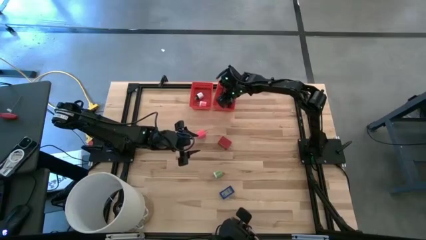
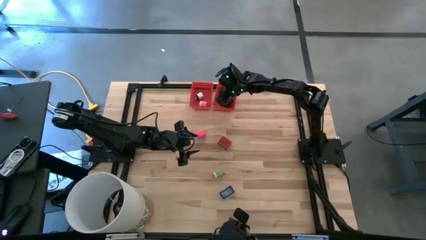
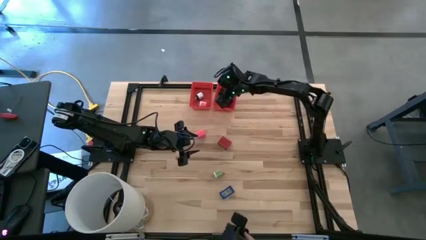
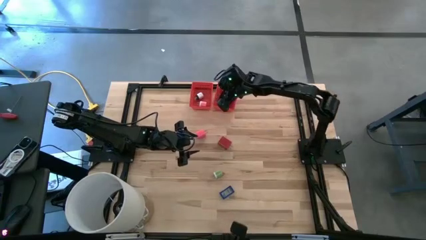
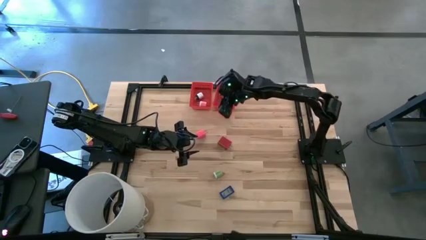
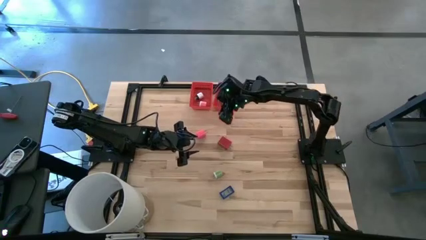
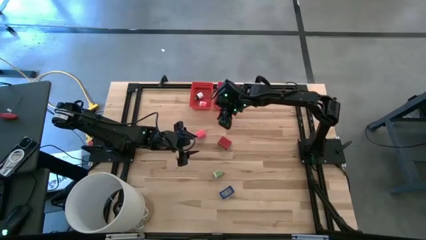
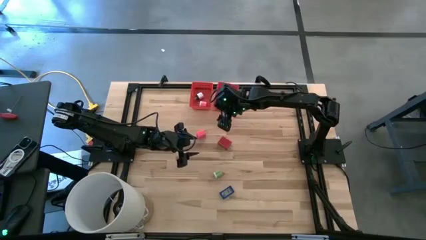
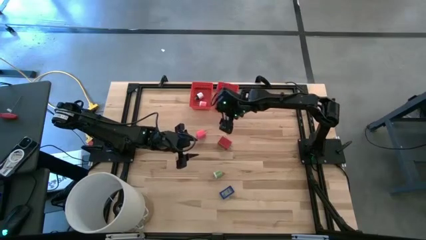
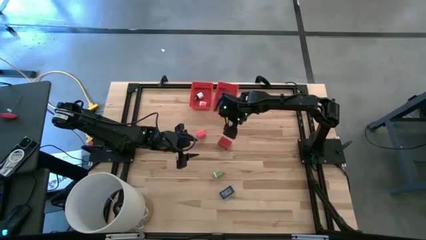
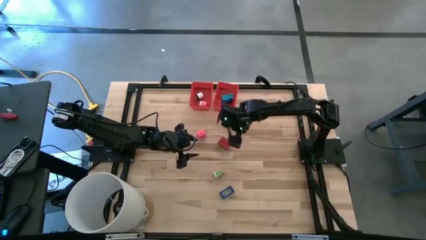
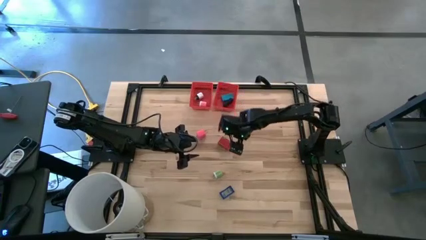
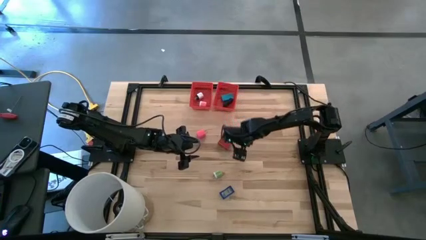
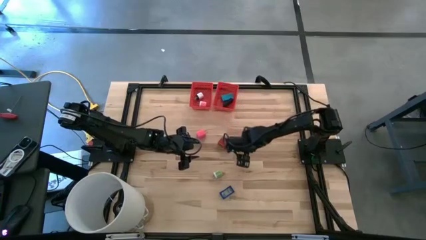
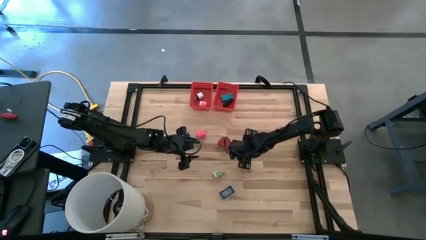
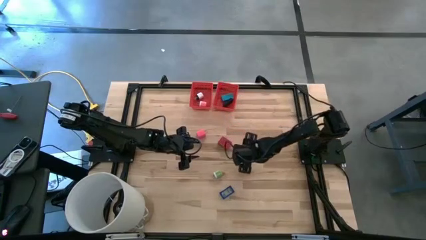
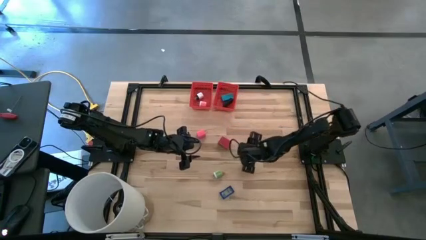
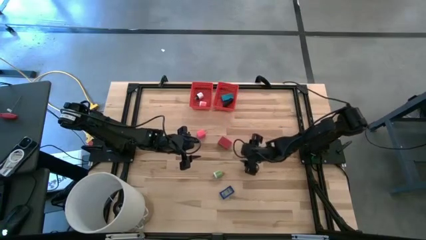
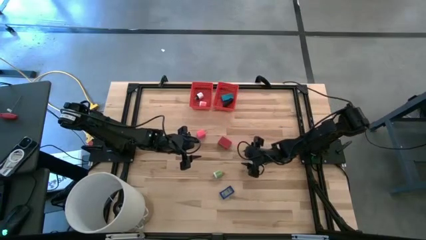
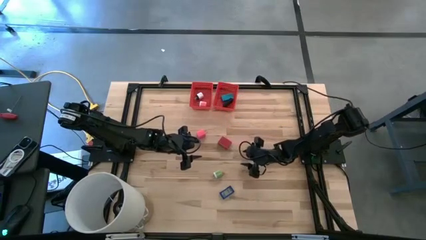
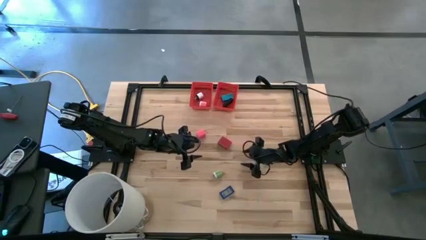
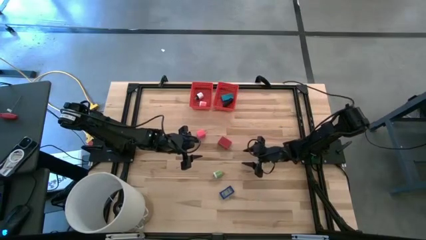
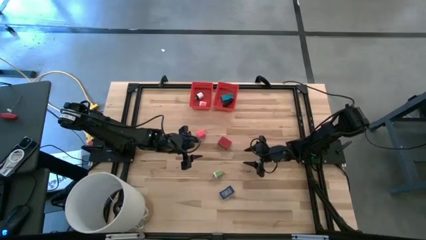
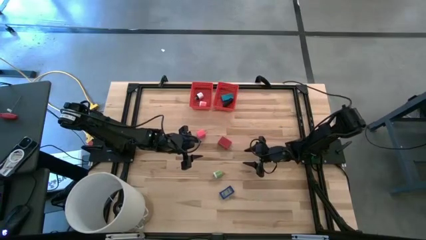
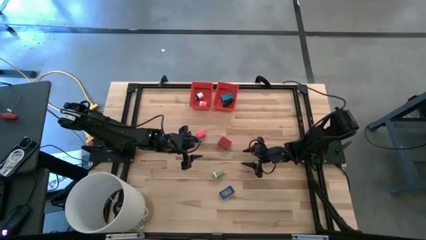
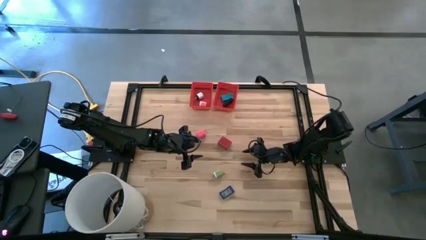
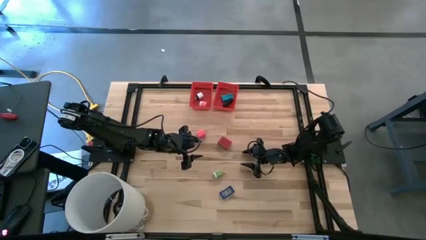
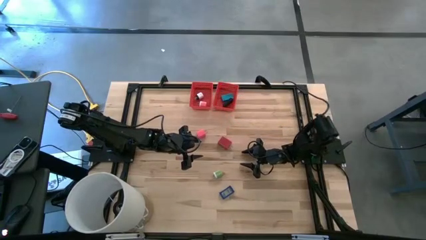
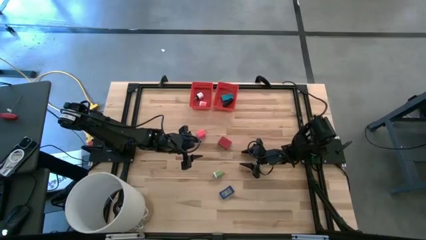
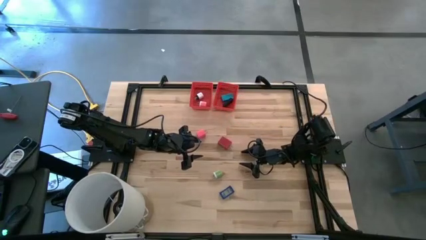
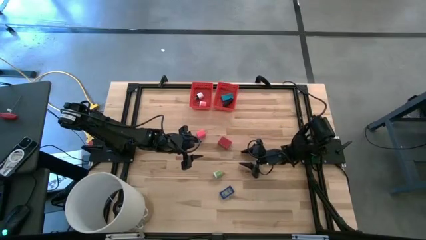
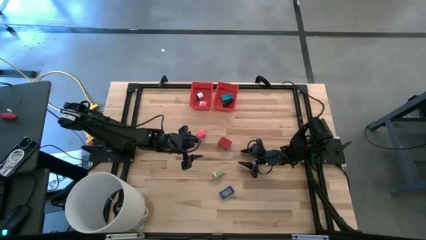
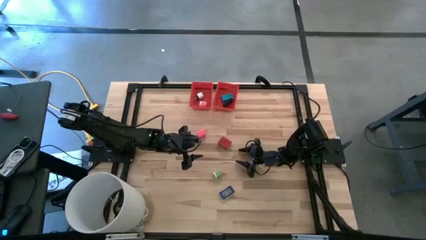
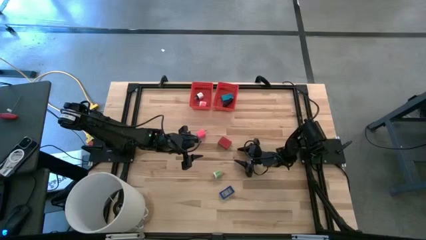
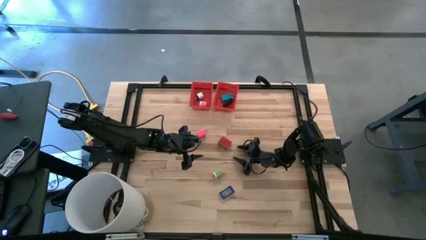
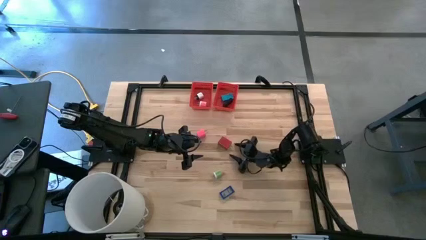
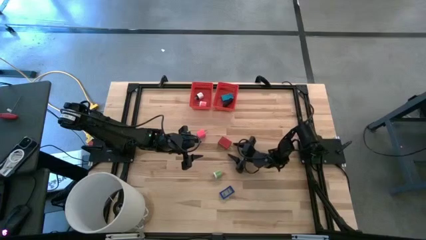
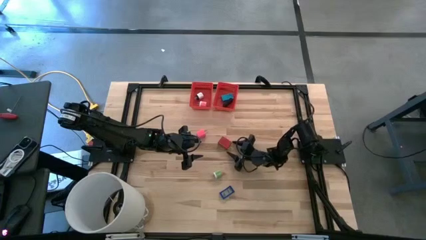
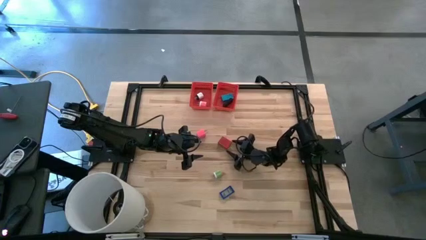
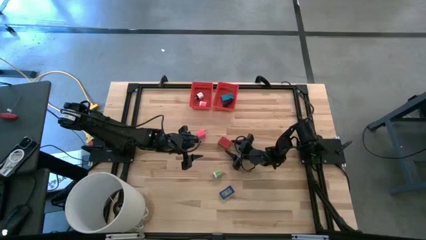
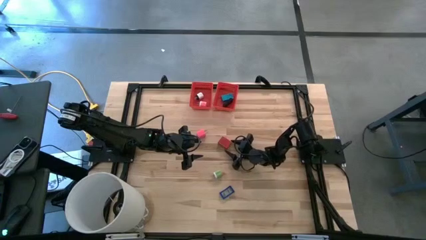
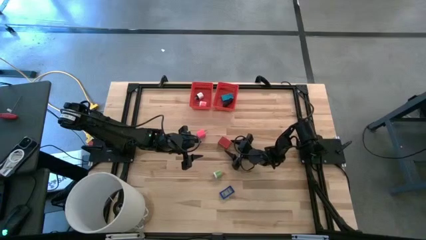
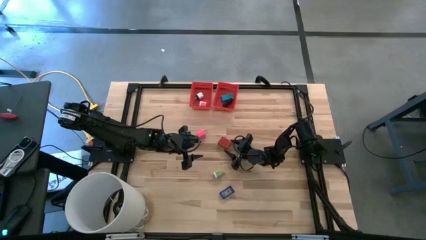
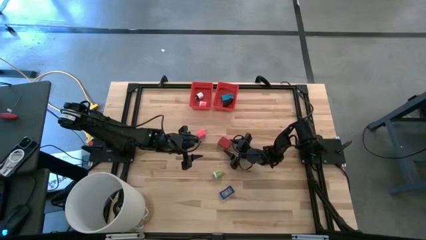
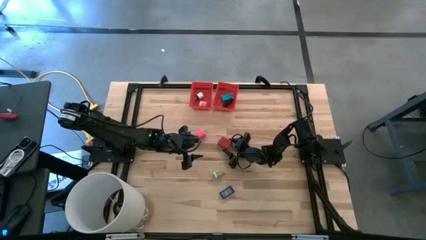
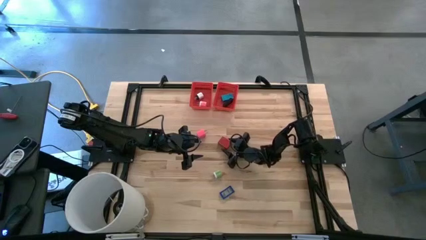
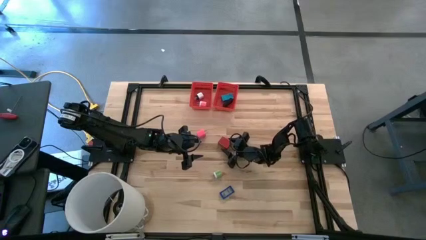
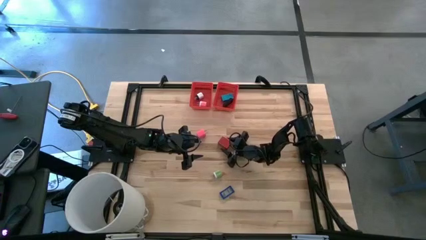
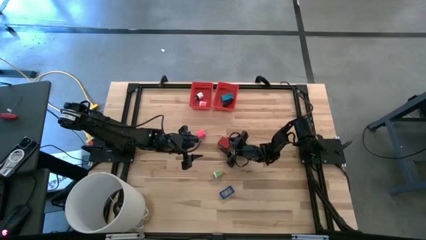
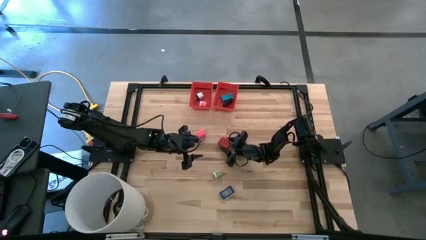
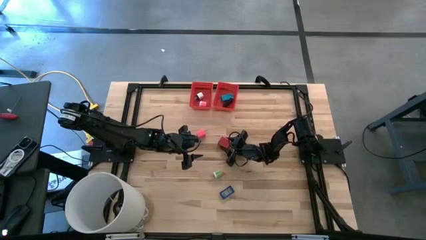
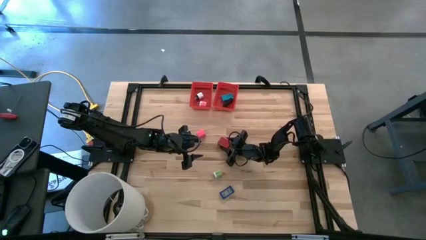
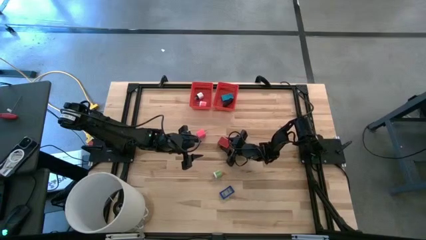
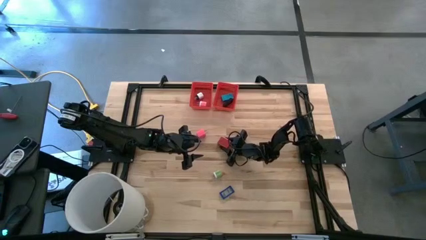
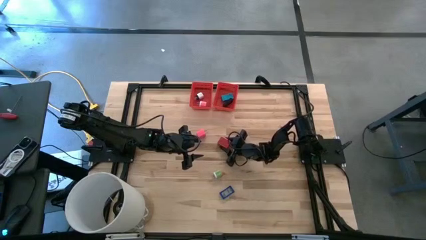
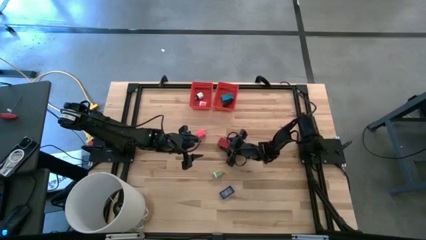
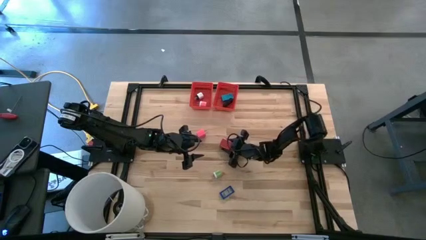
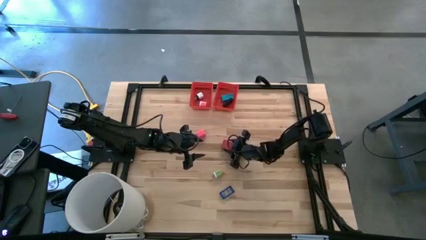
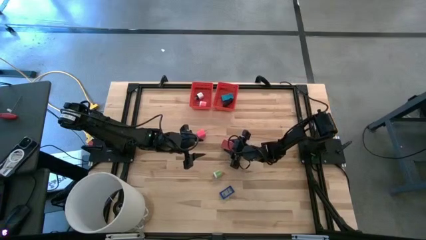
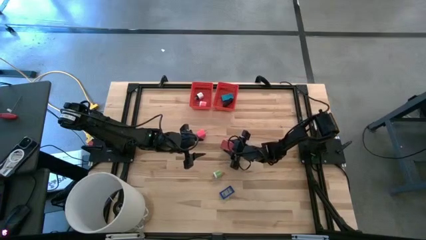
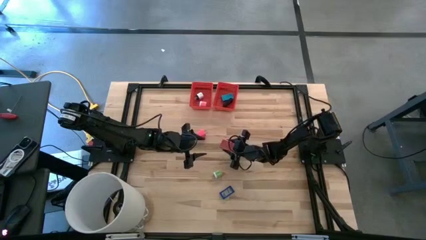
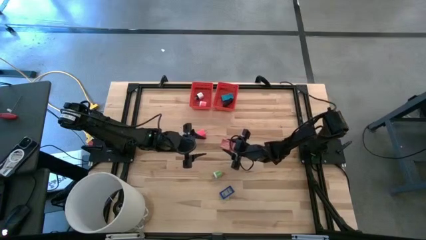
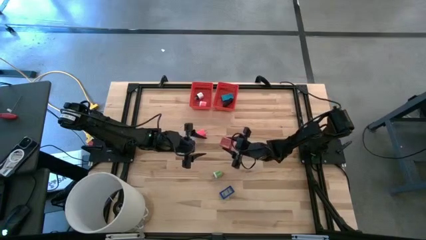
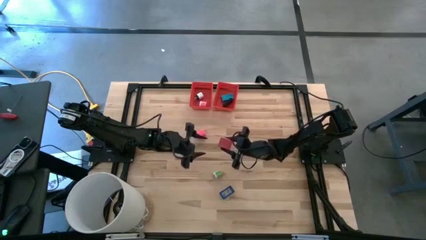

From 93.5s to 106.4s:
Task: Pick & Place Office items
Put the red charger adapter into the left red basket

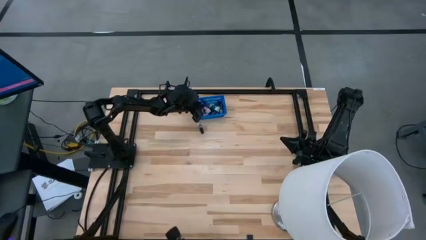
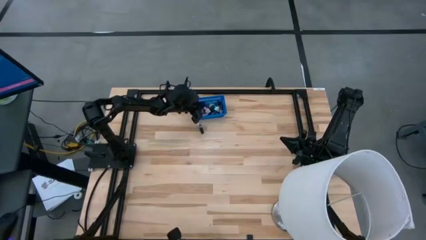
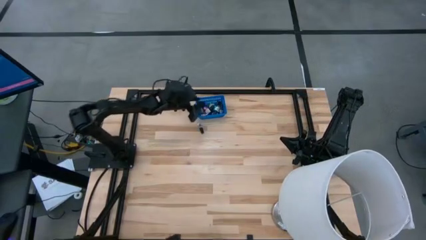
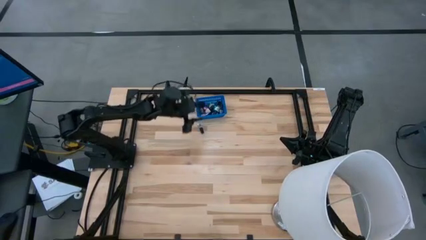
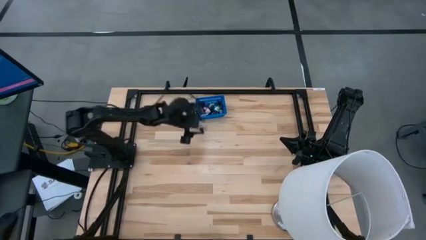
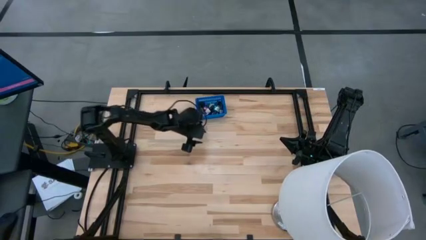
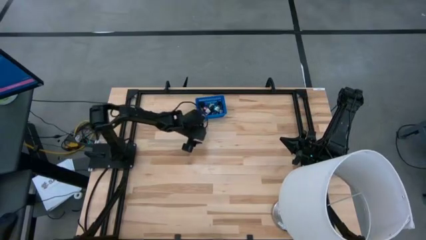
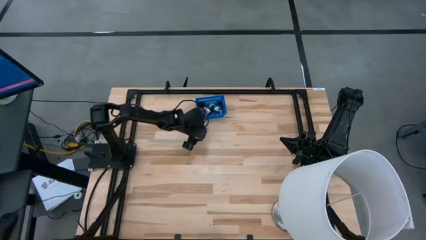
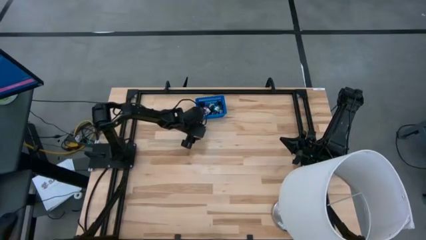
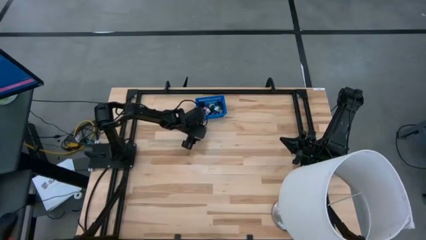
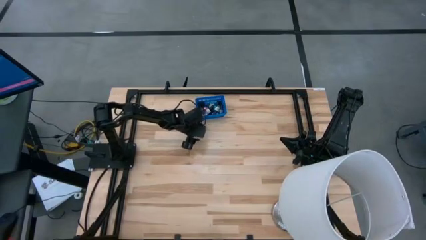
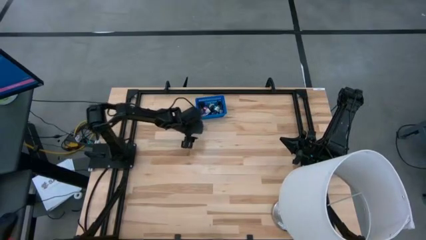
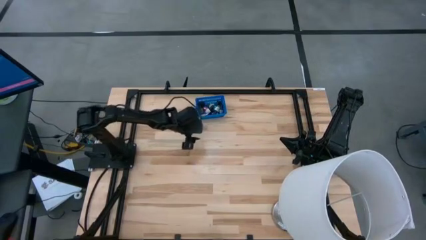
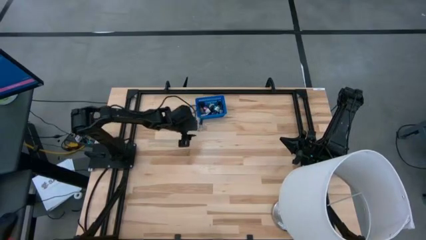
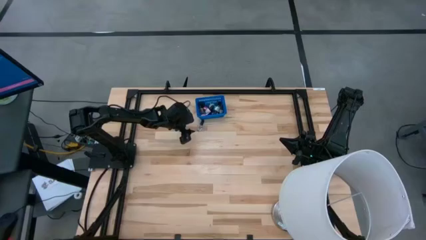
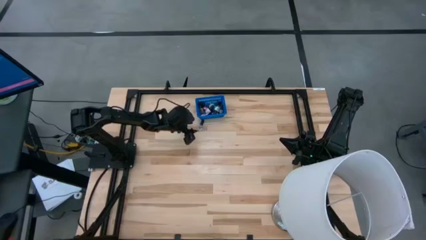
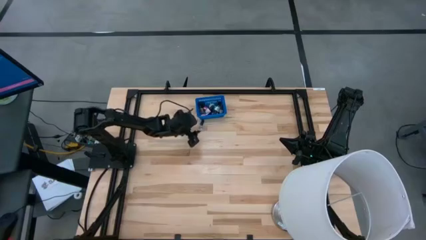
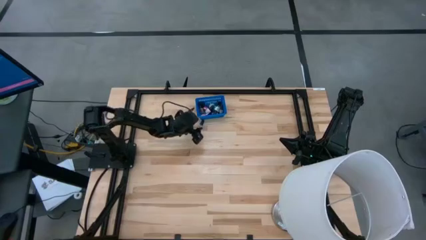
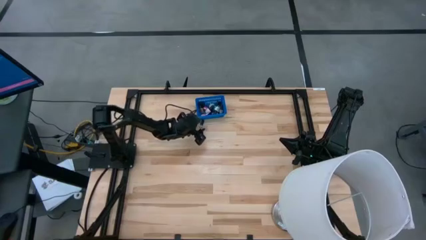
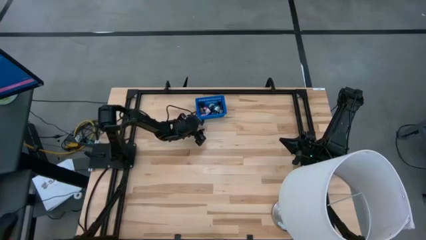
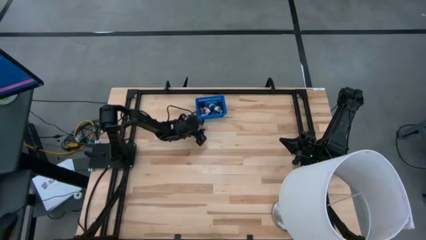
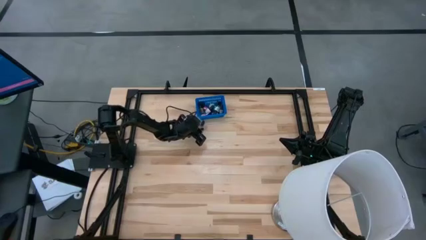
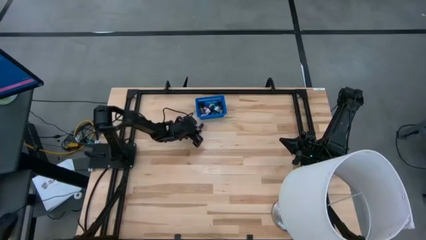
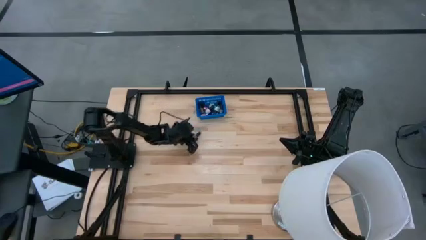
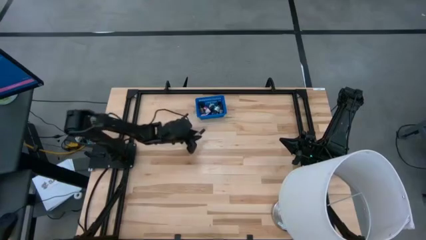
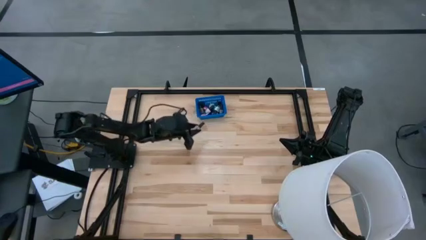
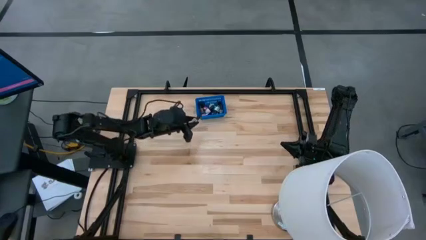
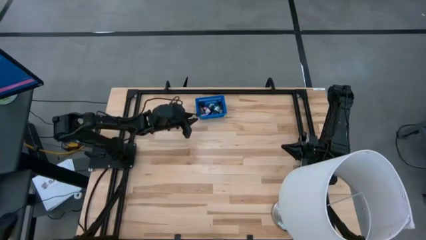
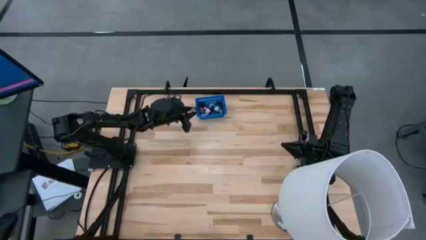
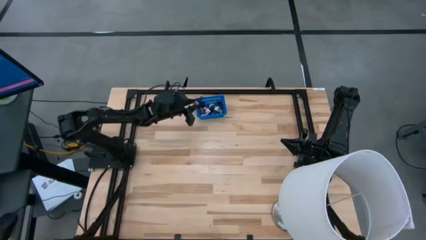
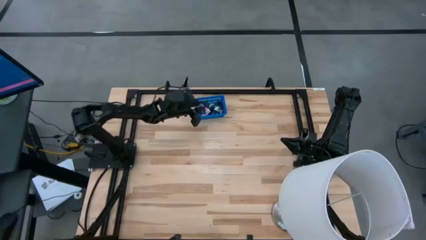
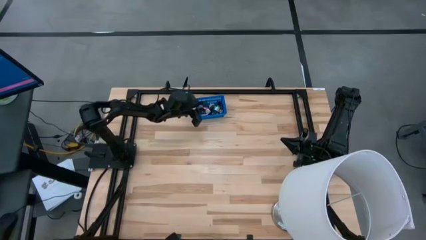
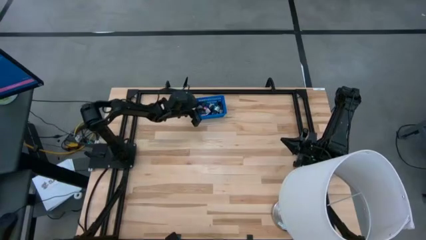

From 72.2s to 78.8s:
Task: Pick & Place Nail Polish
Put the transparent nail polish bottle into the blue basket
